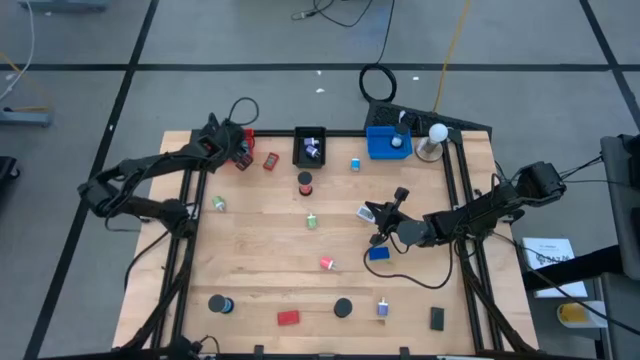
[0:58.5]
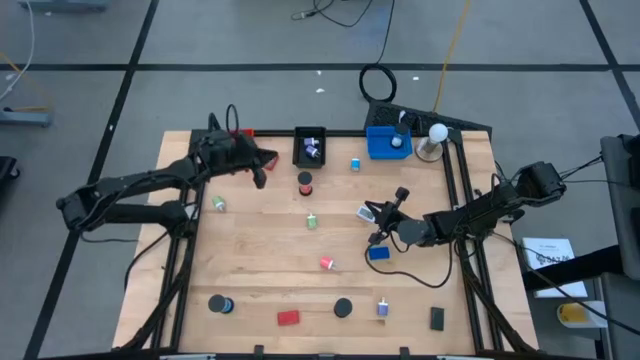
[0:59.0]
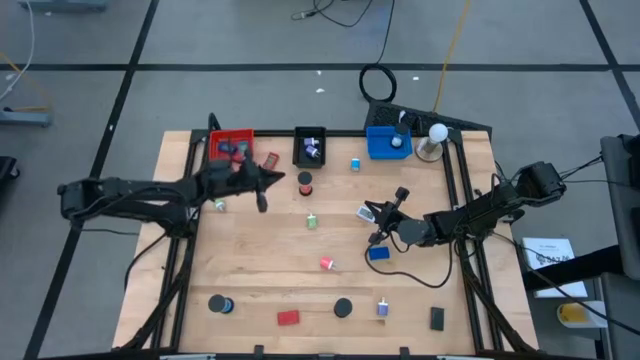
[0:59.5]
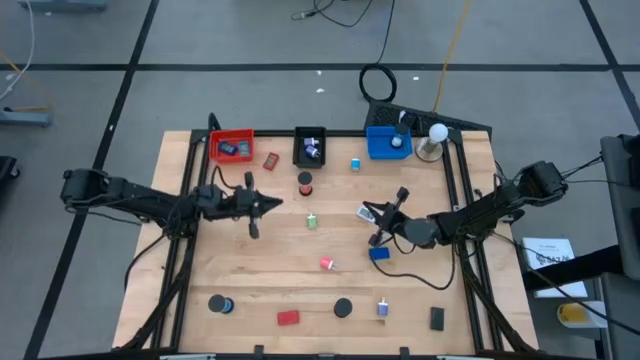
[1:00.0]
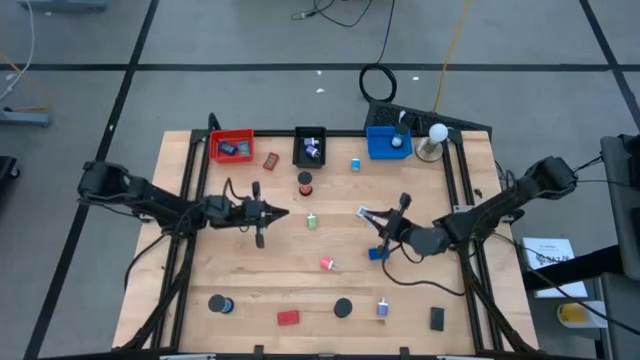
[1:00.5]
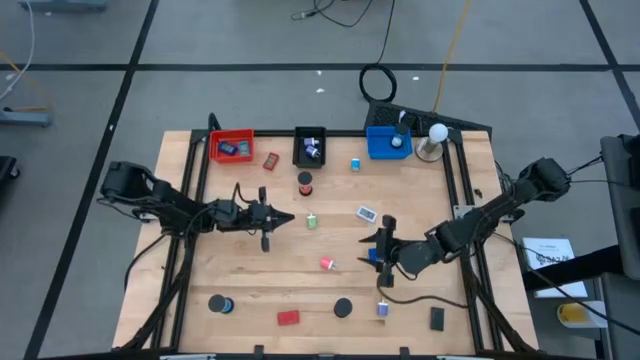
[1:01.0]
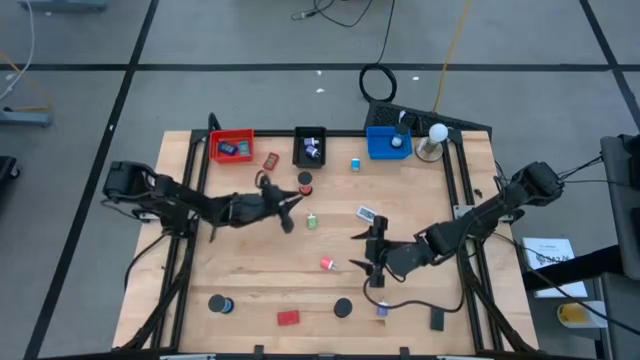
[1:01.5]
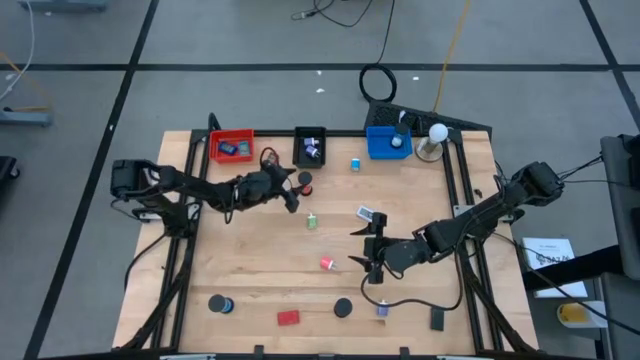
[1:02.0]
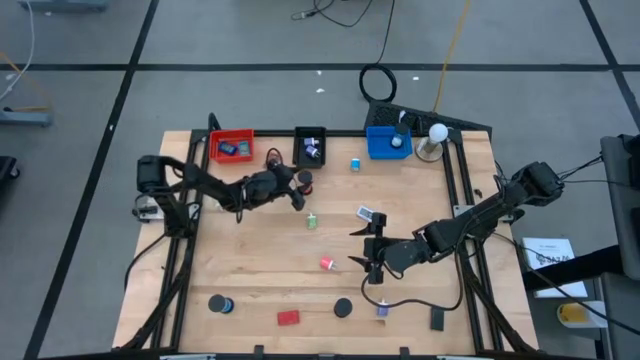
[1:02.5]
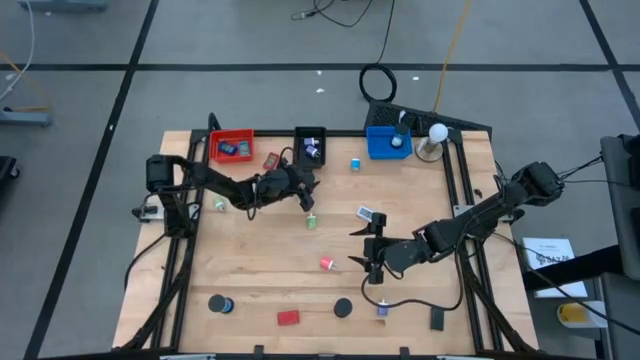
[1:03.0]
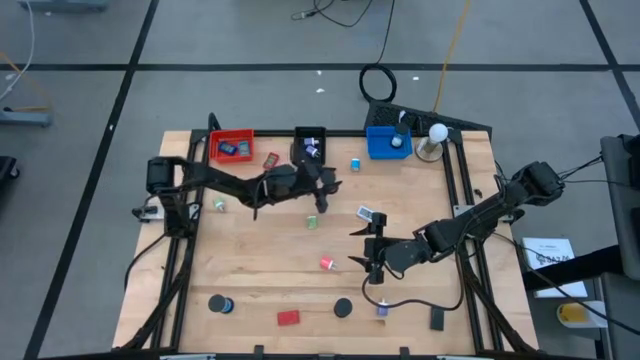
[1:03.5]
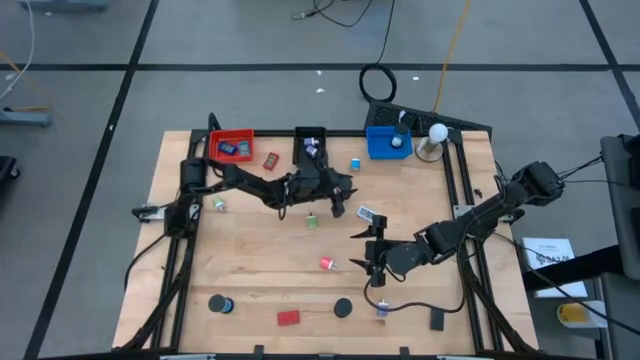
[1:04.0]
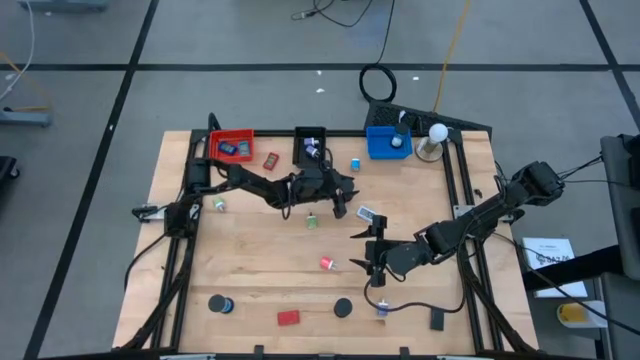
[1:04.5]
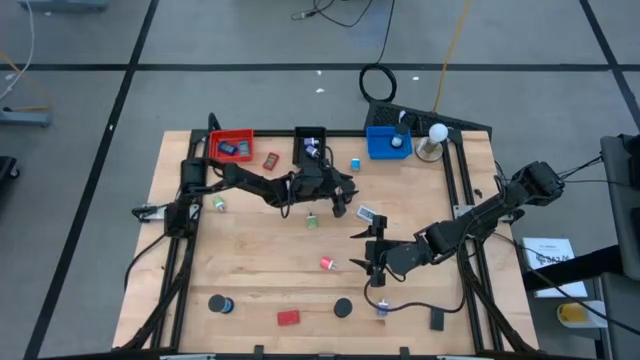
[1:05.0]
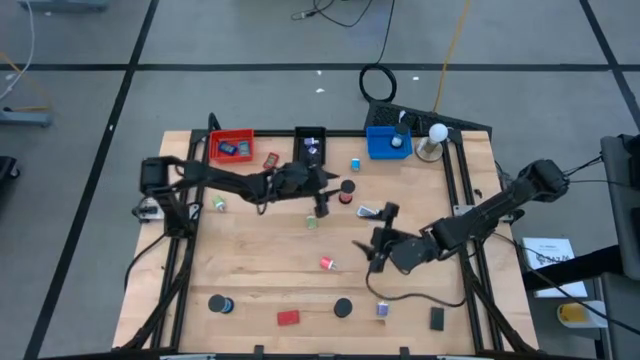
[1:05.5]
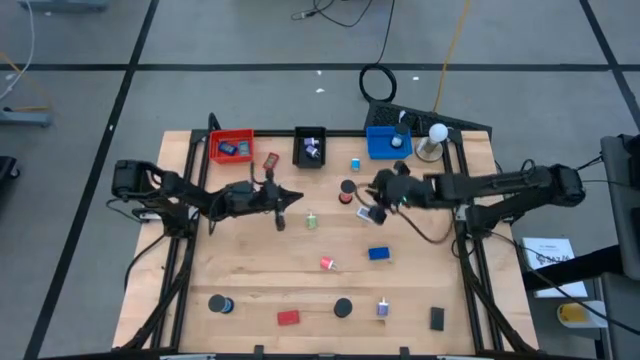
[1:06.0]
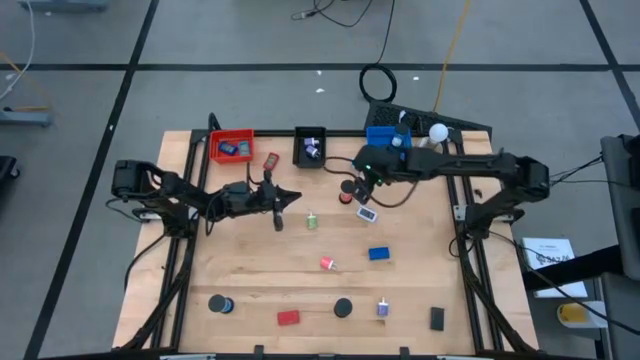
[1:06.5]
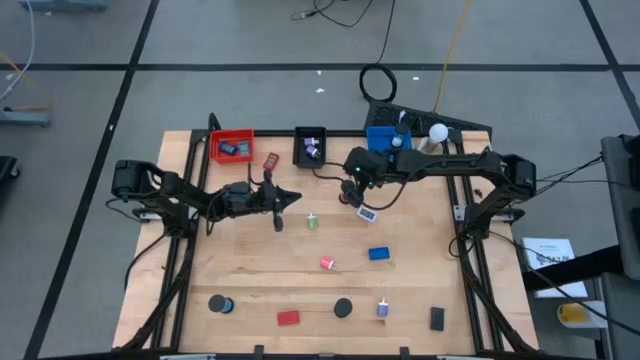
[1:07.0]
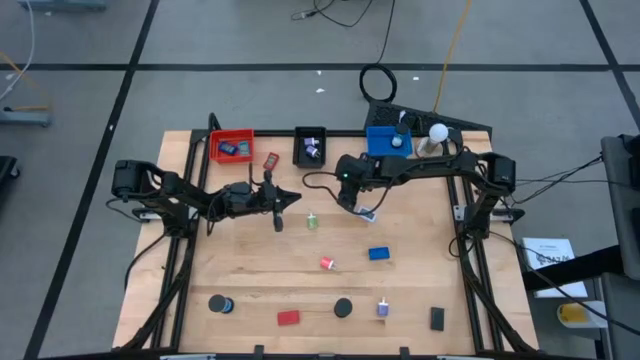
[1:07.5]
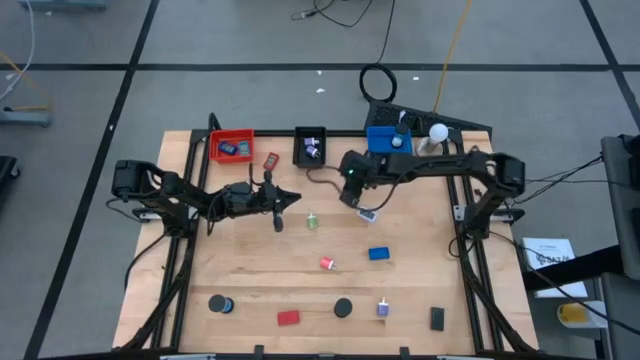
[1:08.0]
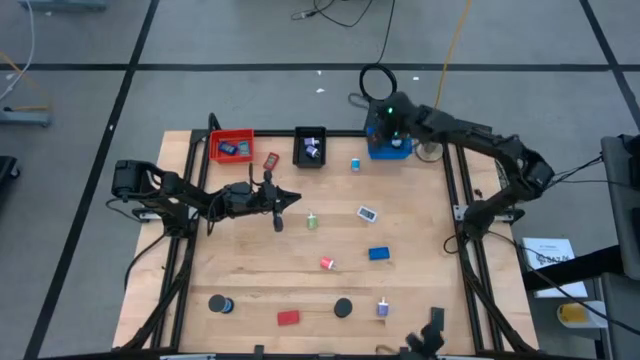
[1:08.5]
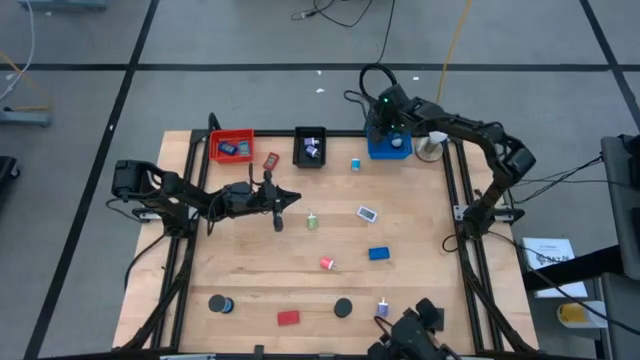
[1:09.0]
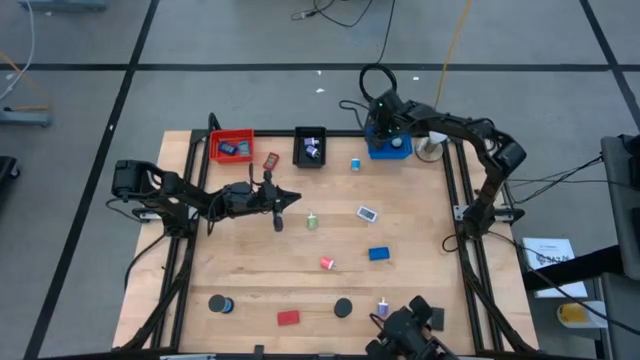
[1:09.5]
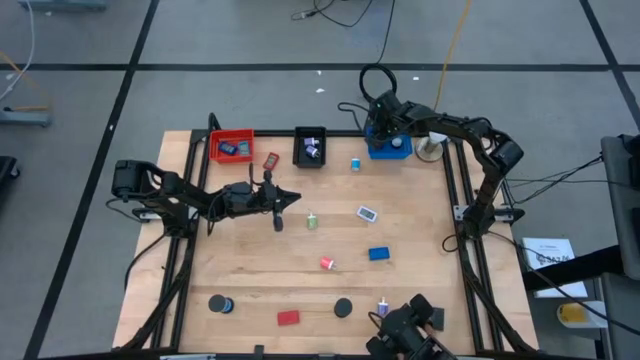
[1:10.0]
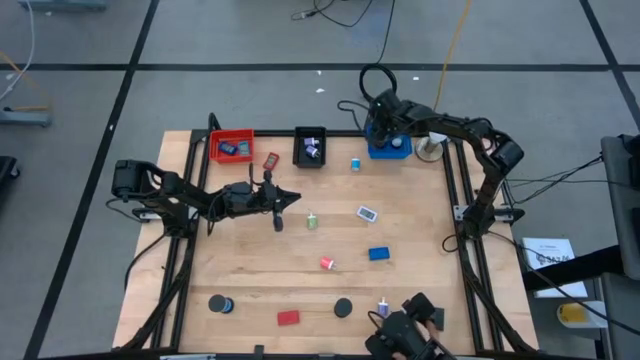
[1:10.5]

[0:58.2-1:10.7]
Task: Pick & Place Office items
Put the red hourglass into the blue bin

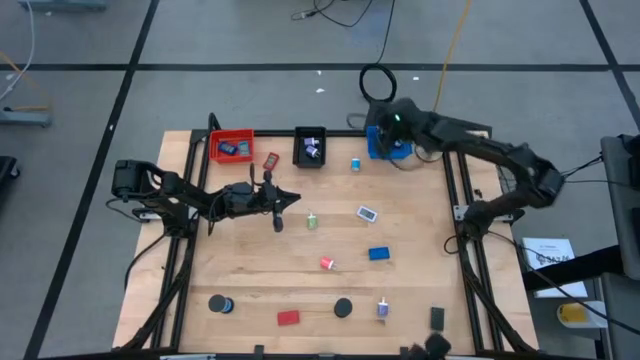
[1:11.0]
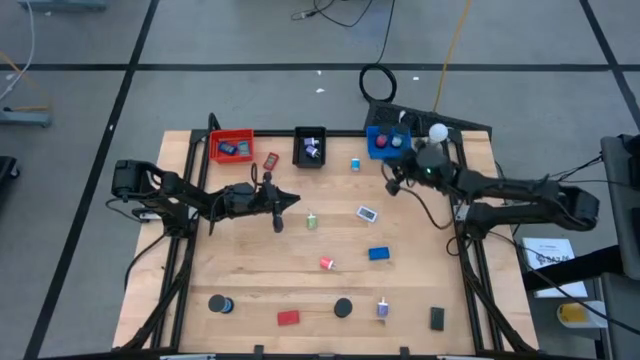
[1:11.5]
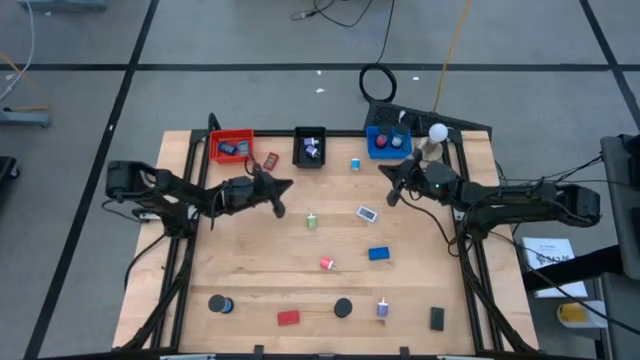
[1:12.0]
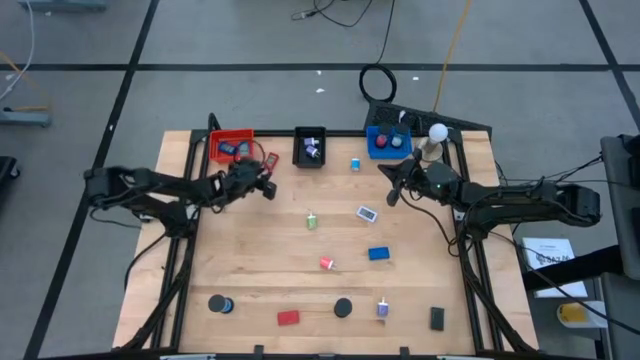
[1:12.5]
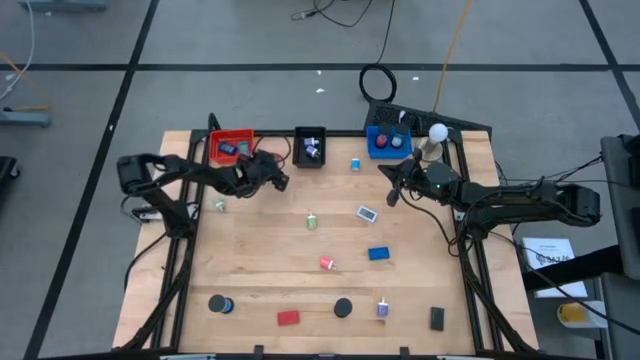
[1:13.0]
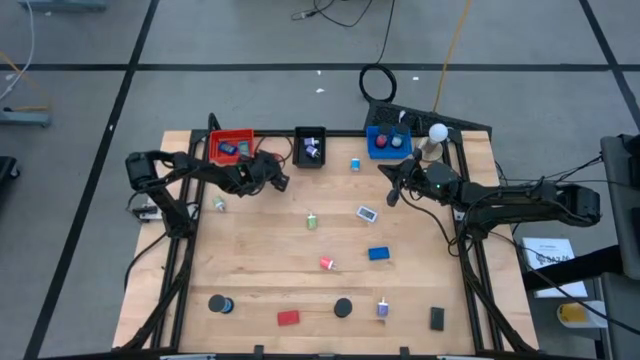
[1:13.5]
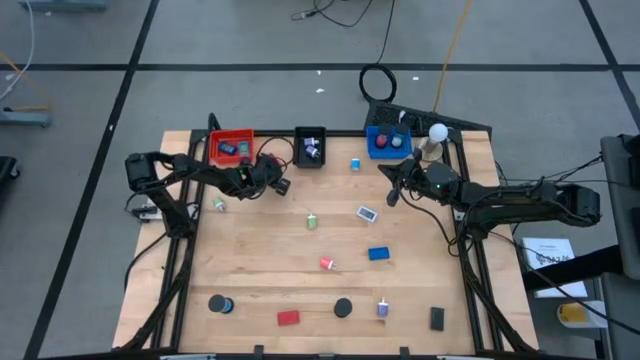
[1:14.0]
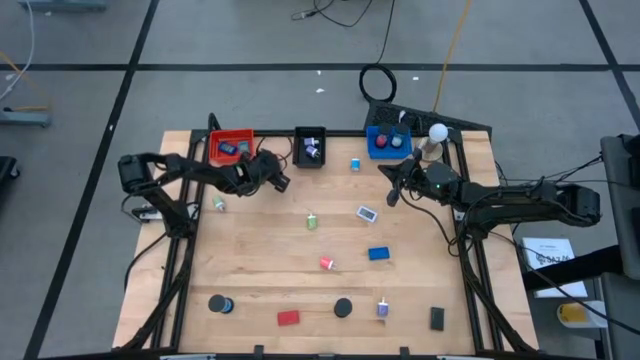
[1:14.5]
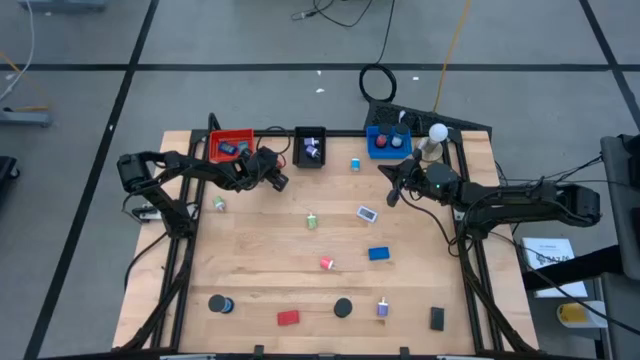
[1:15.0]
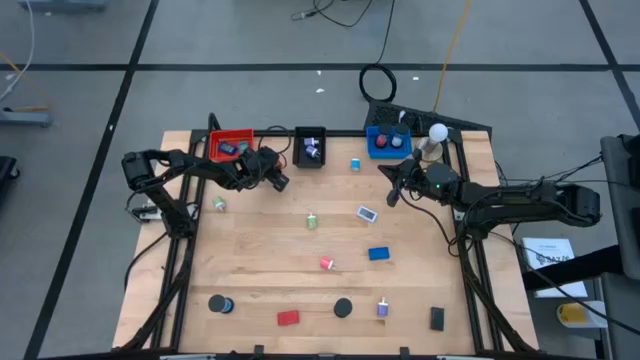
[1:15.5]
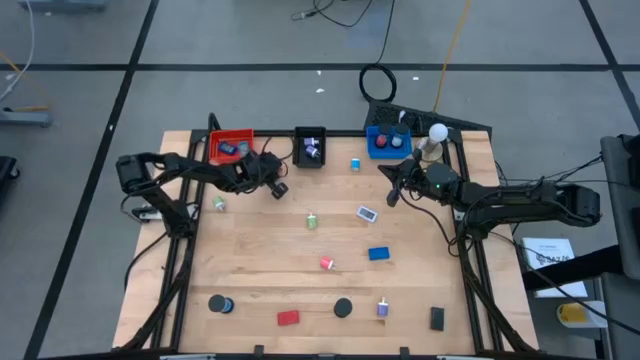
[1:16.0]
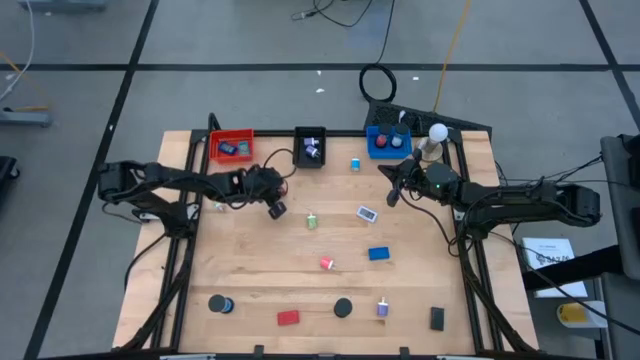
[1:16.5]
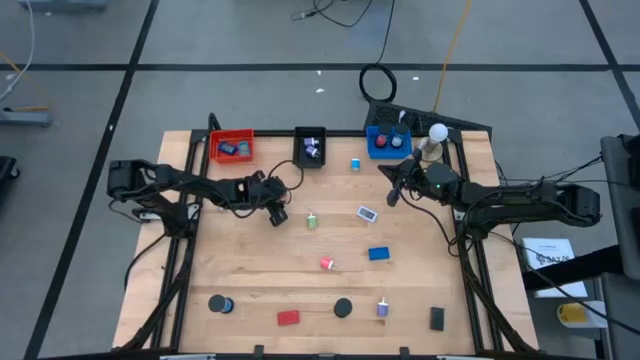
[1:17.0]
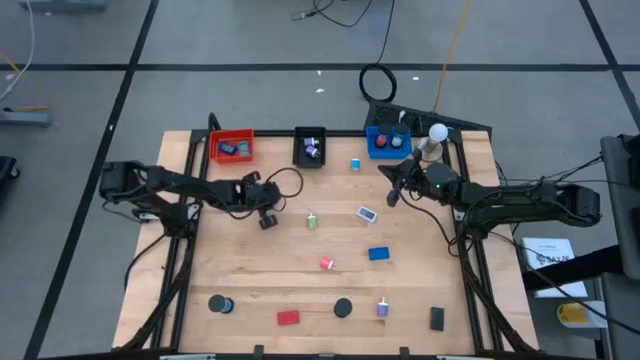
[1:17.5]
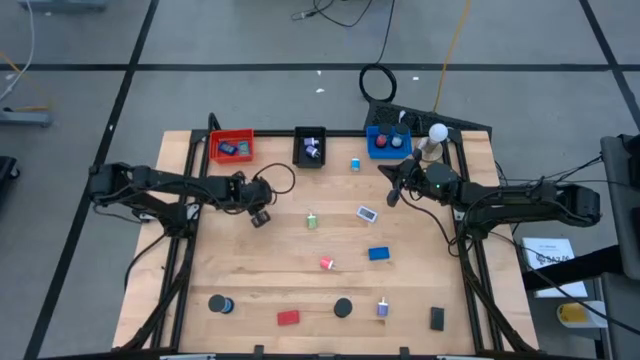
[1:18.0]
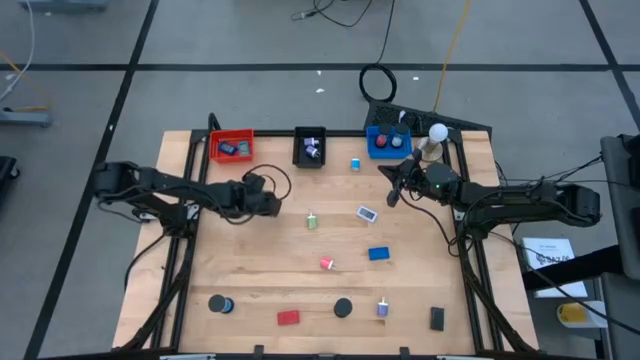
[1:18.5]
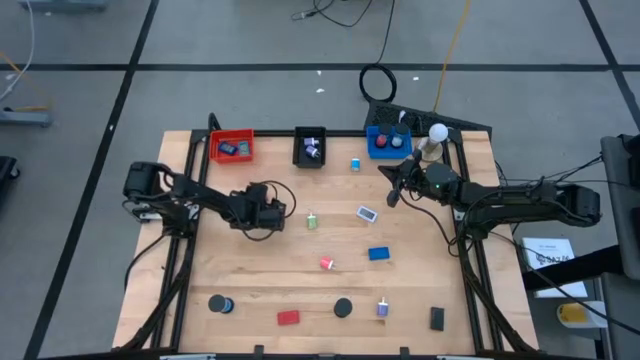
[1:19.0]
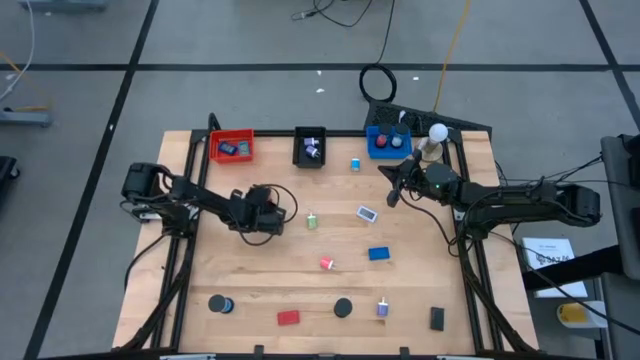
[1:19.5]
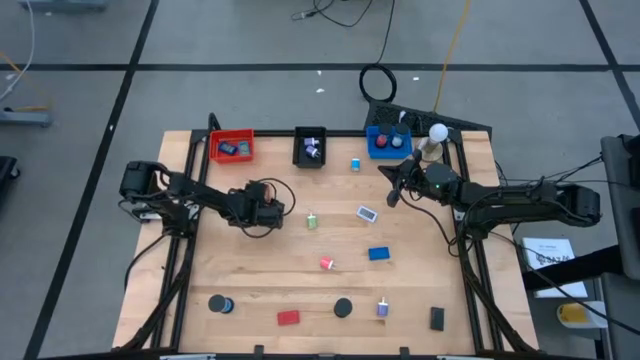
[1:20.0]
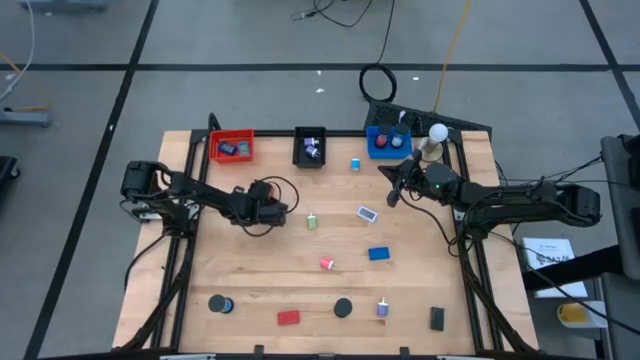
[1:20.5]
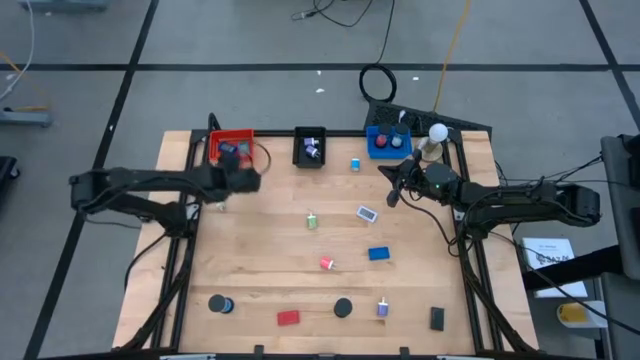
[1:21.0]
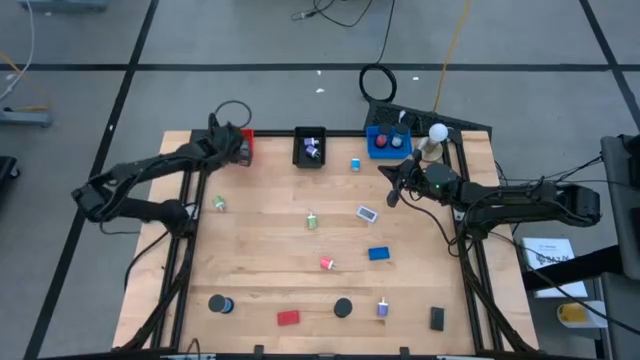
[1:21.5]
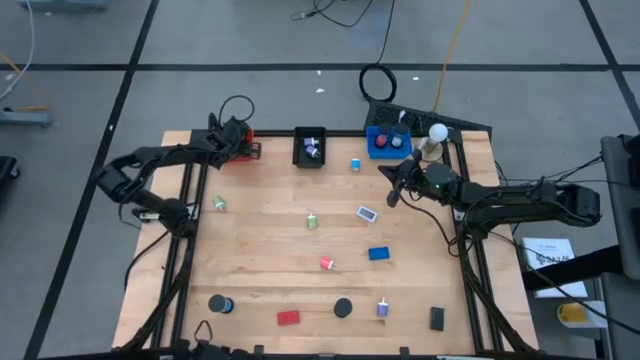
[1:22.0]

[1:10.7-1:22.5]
Put the top red digital clock into the red bin
